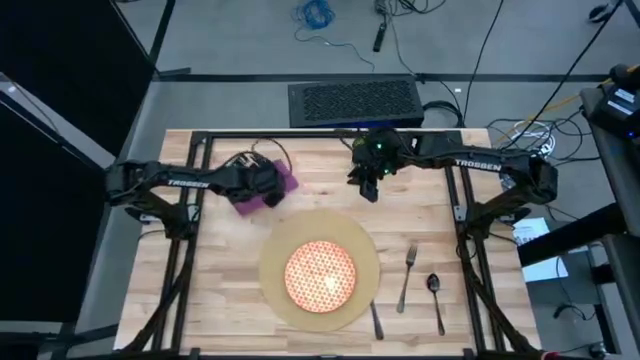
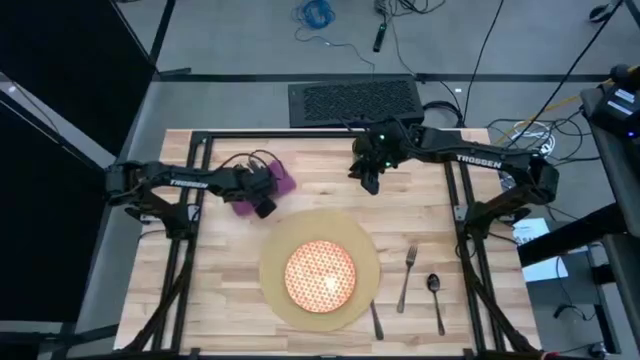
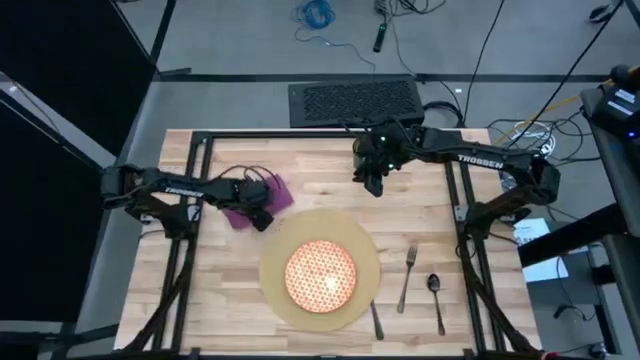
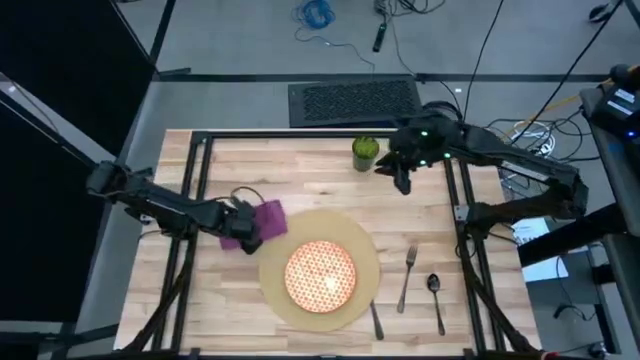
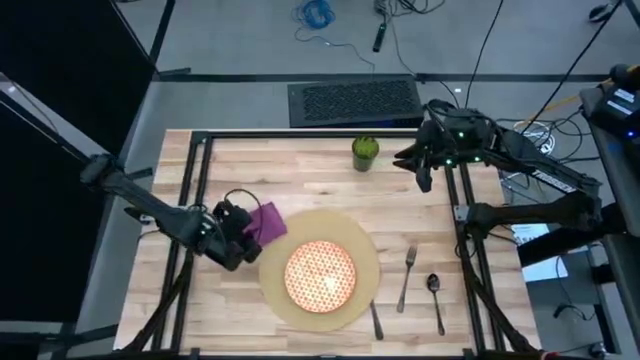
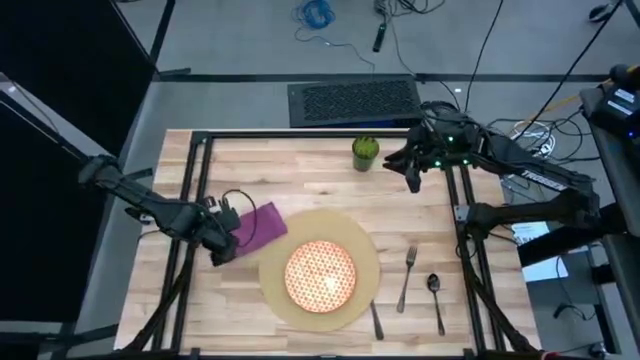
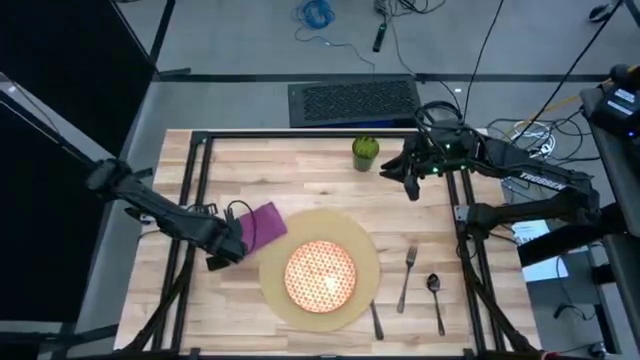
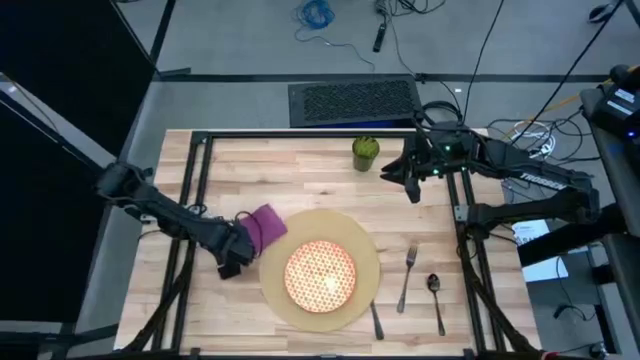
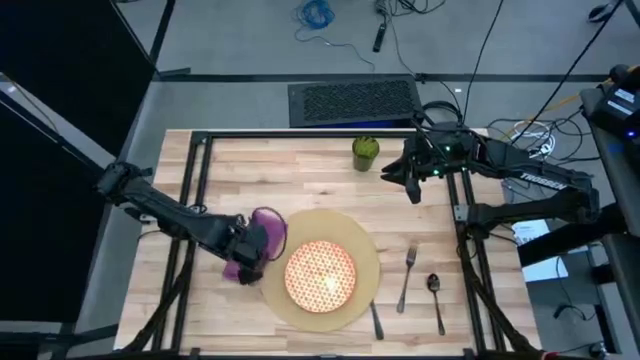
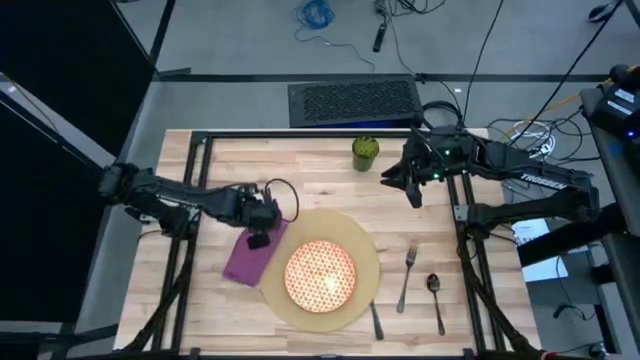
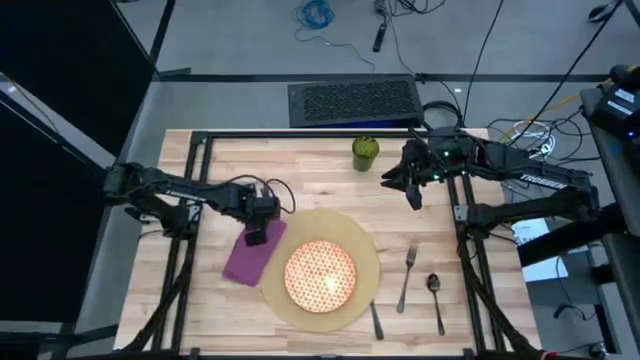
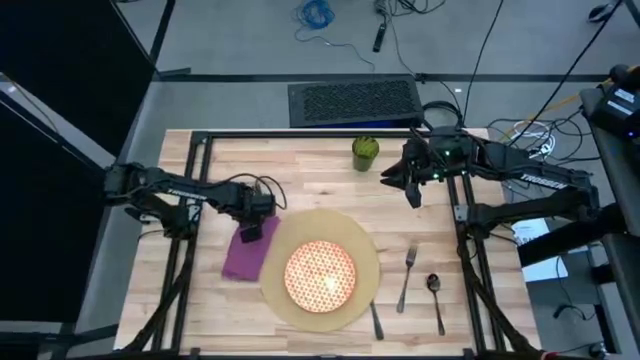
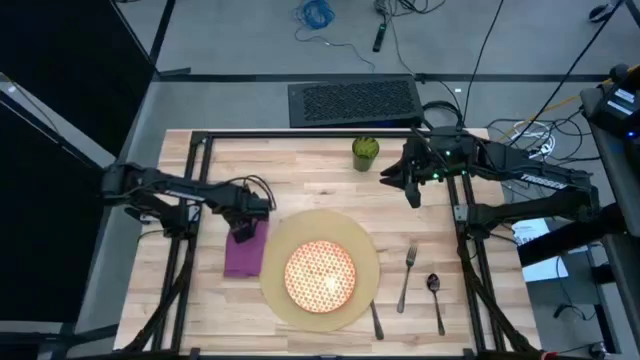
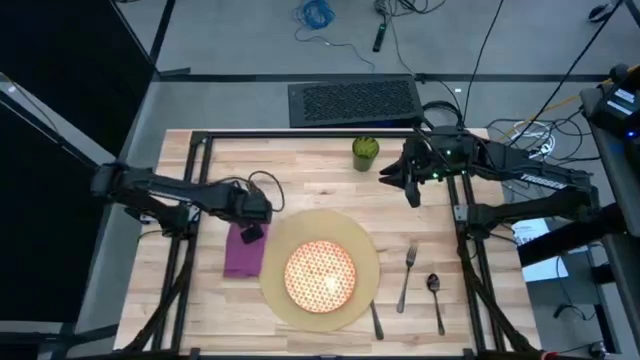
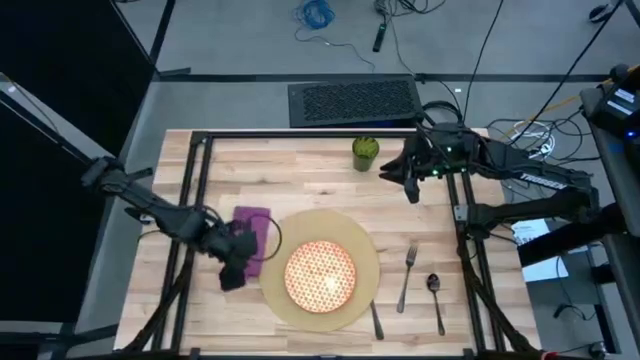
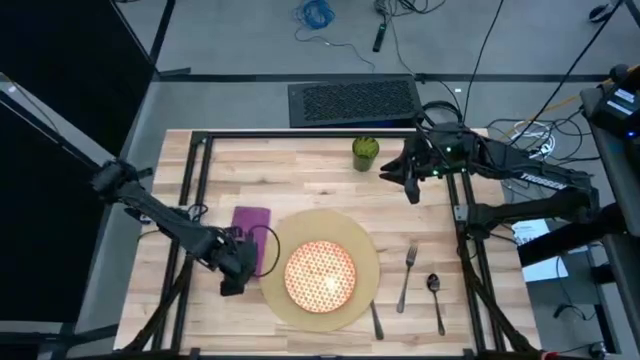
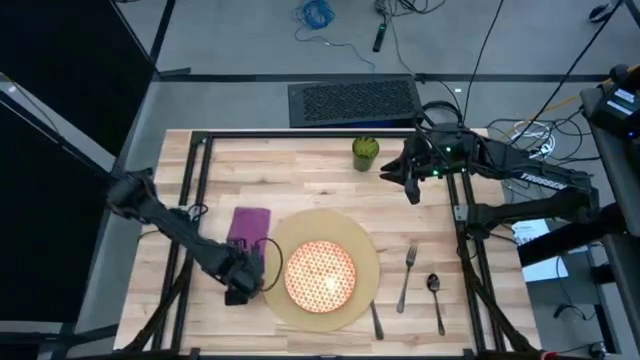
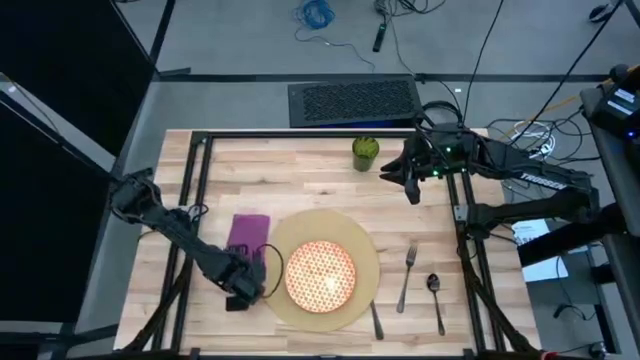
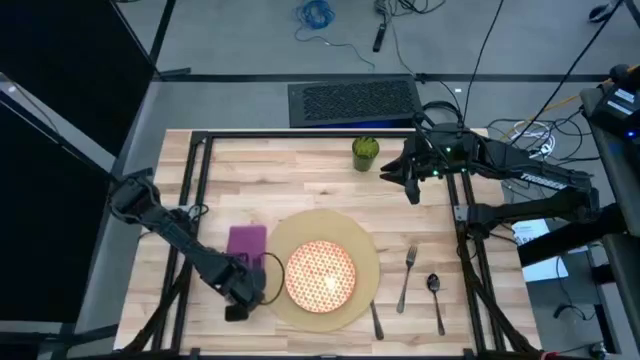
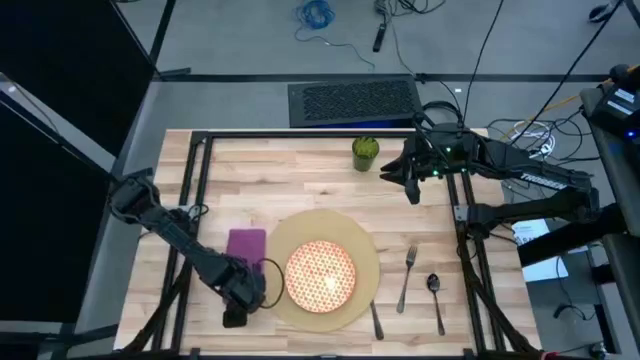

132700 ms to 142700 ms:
Task: Set table place
Move the purple table napkin to the left of the orange patterned plate

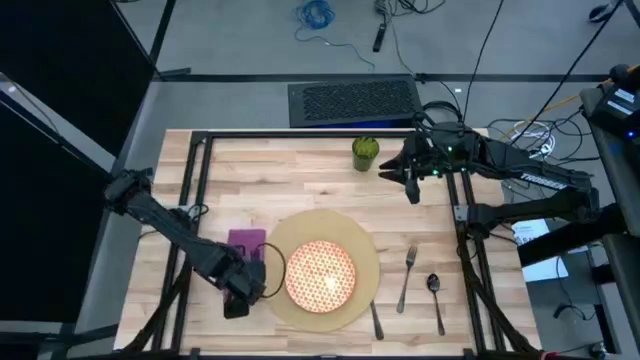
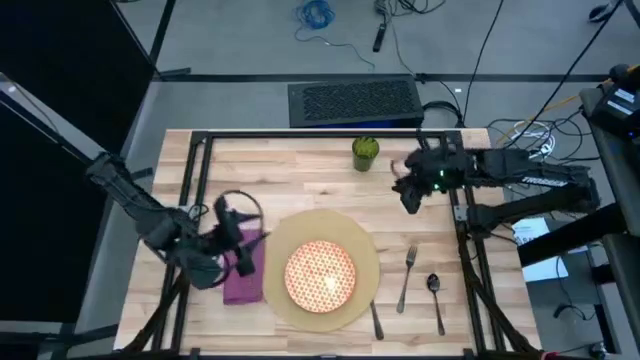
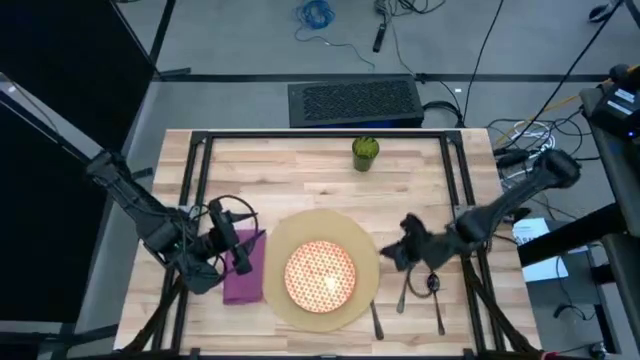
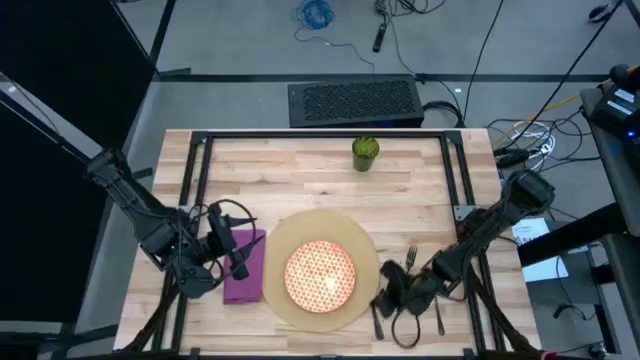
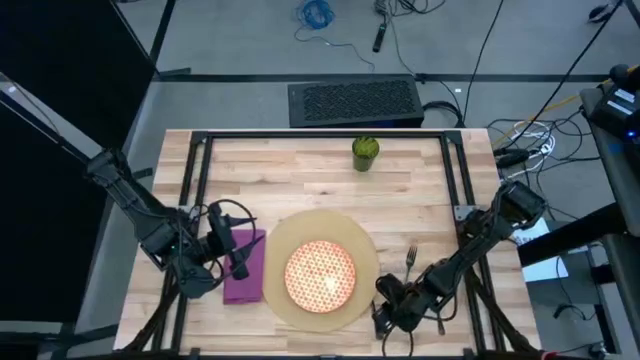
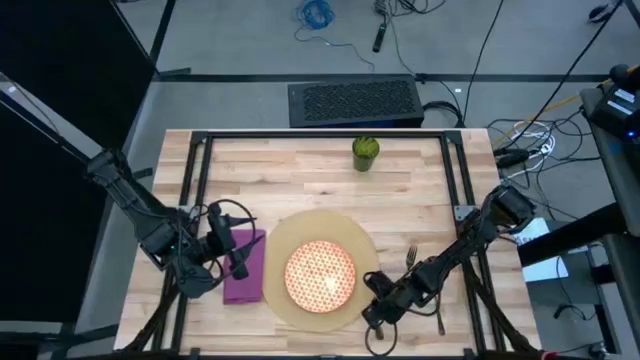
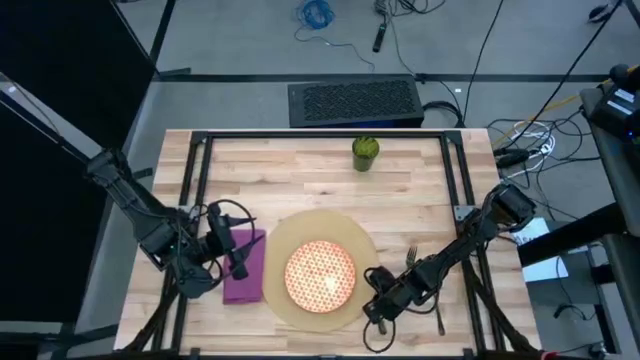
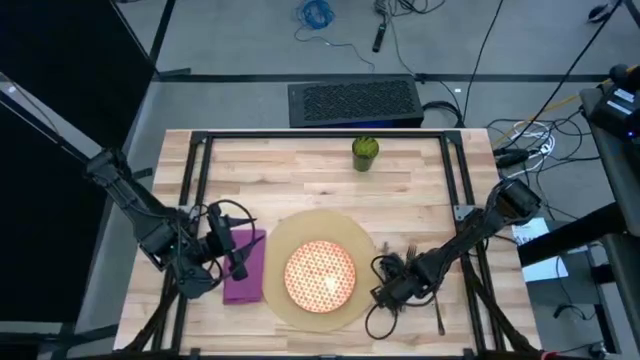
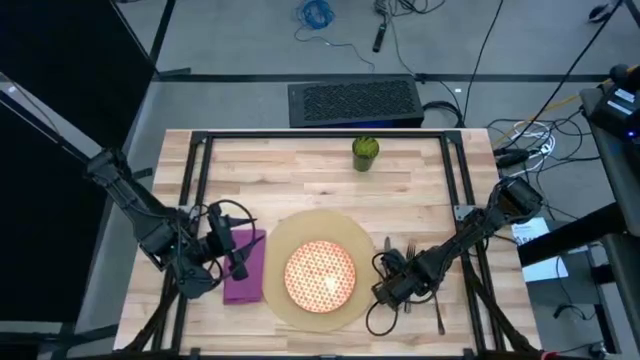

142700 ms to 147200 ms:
Adjust the black table knife

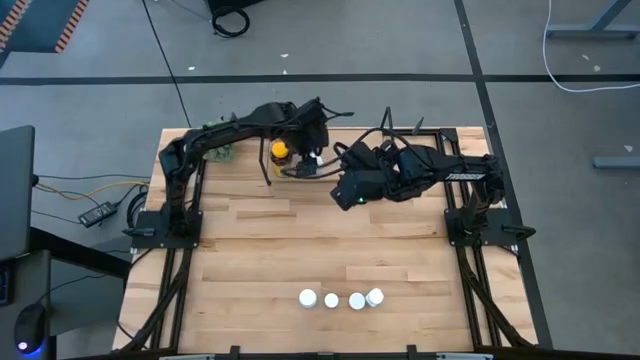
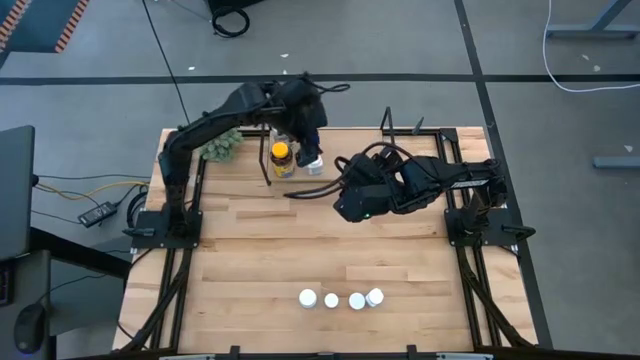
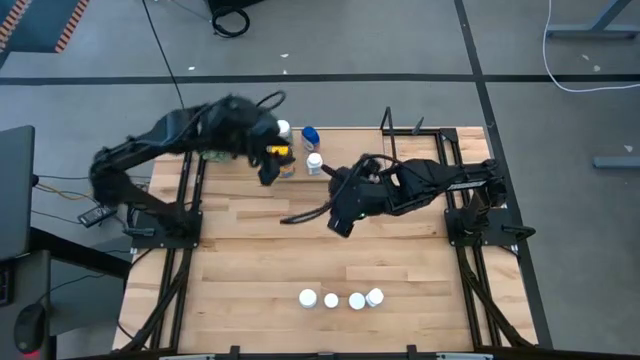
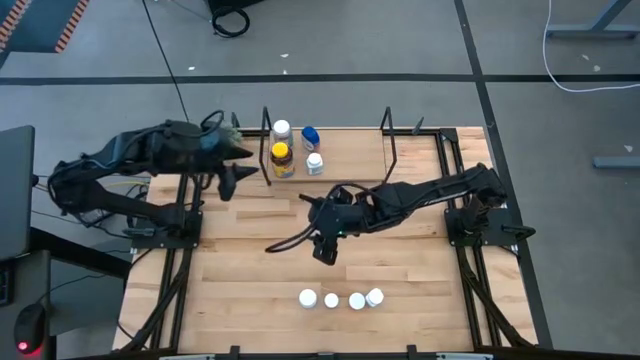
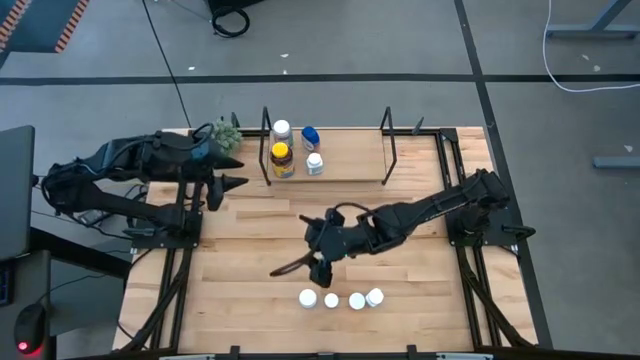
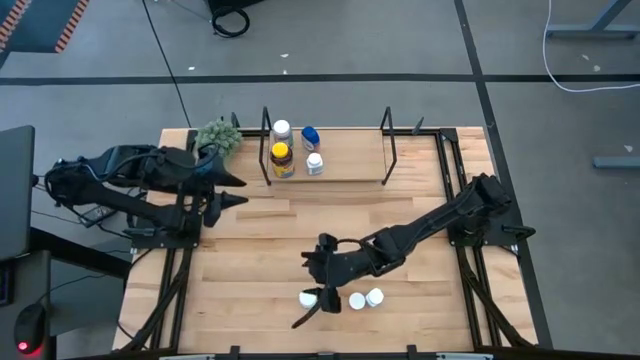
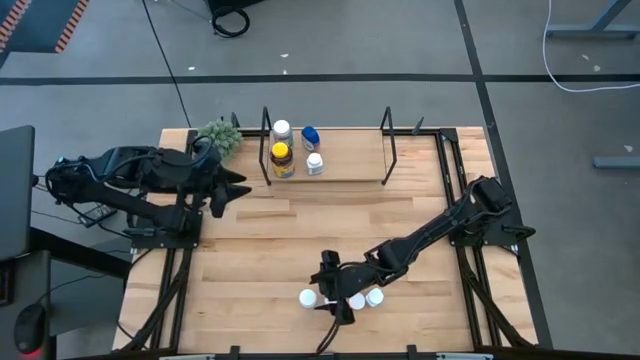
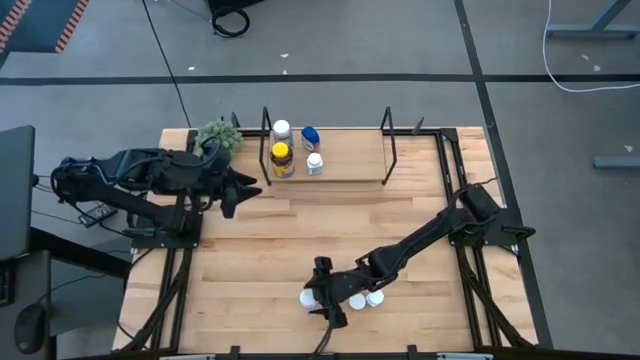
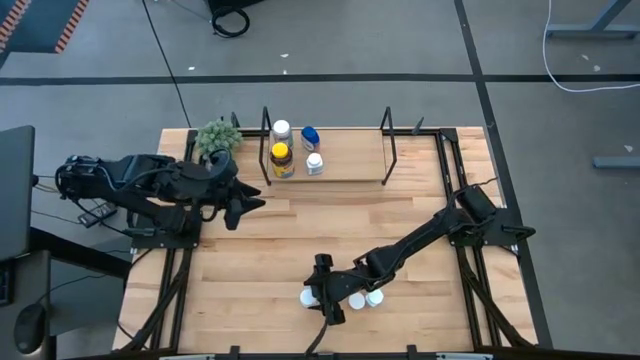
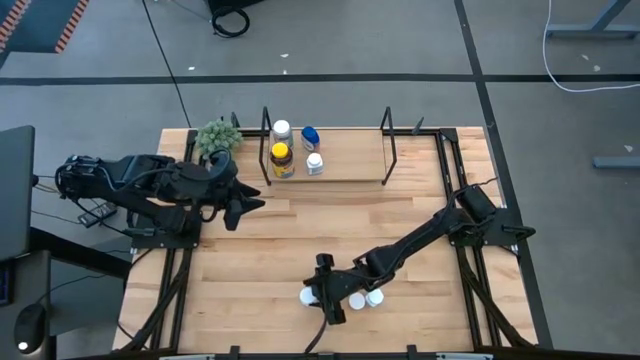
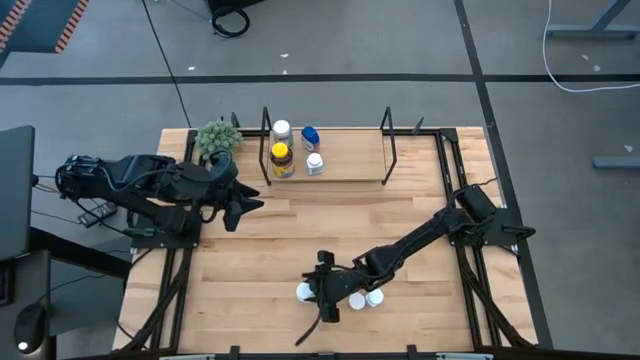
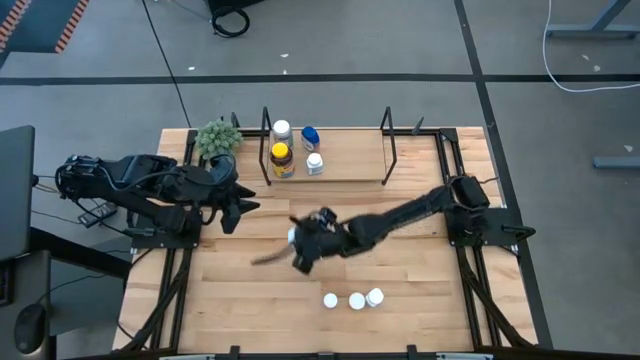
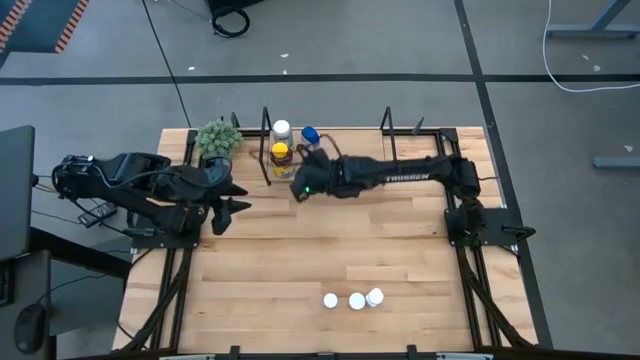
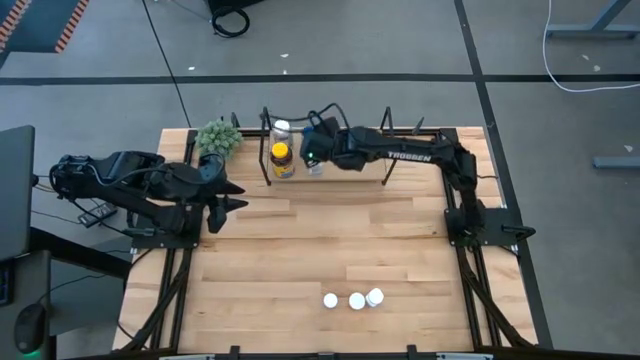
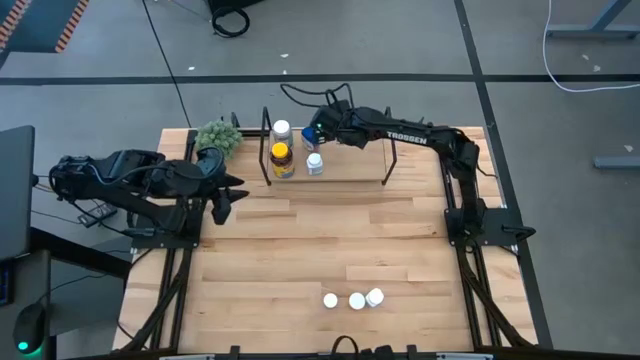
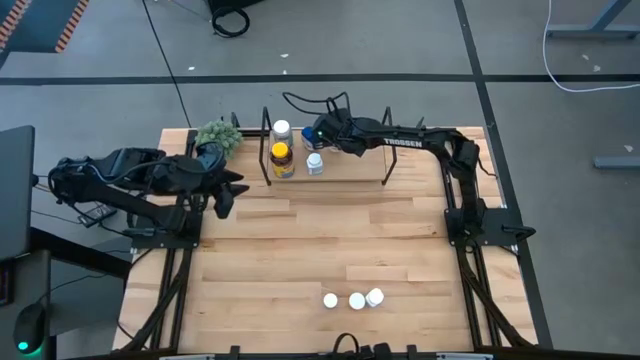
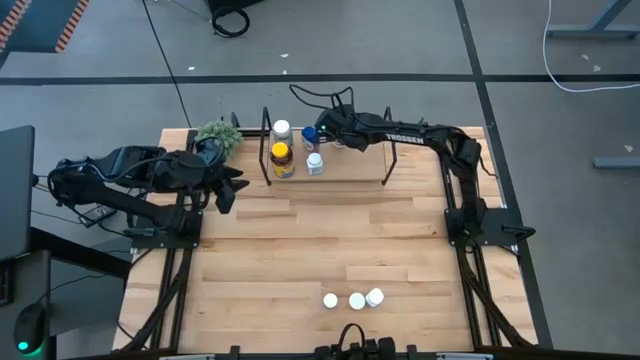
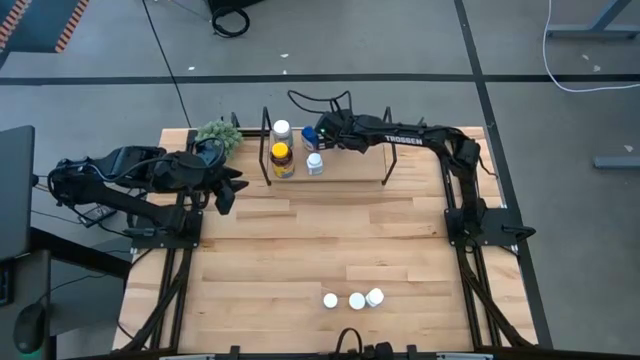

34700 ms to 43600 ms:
Task: Pick and place medicine bottles onto shelf by color
Put the white medicine bottle on the shelf
